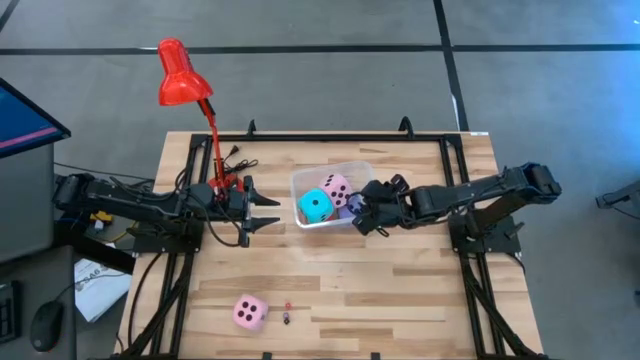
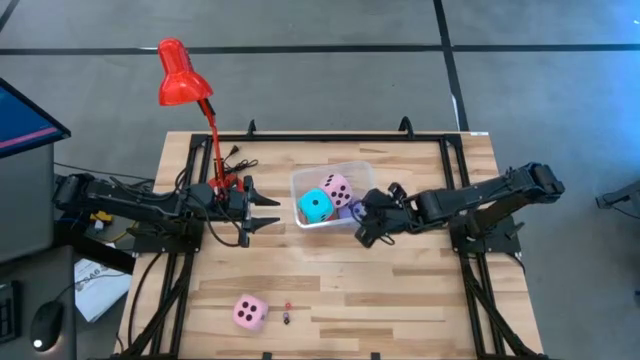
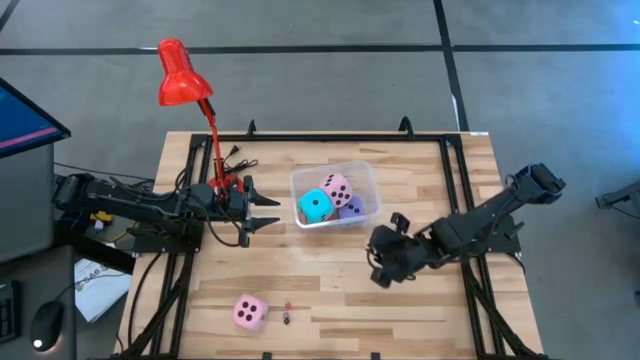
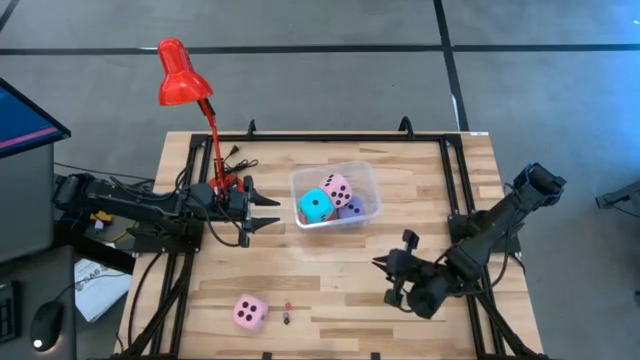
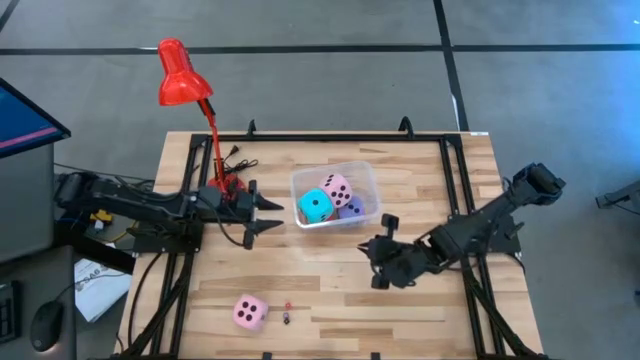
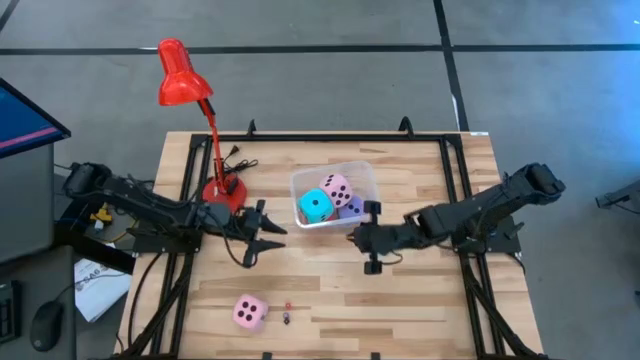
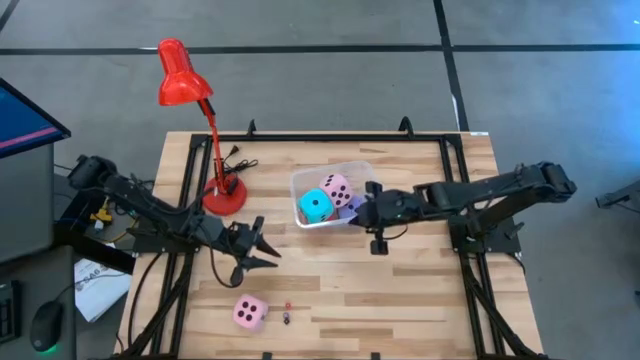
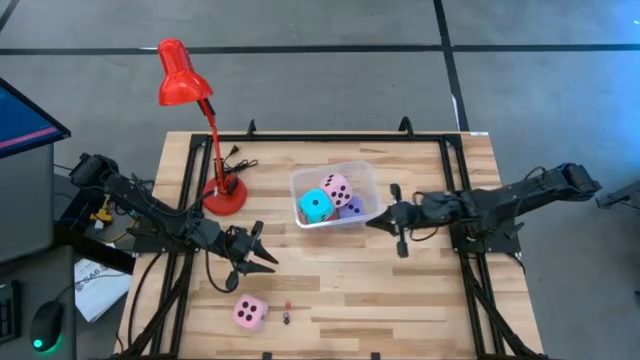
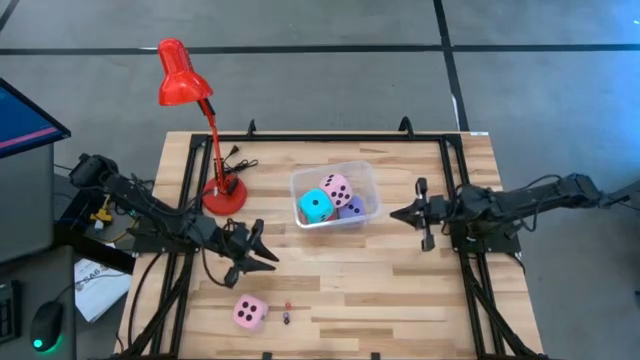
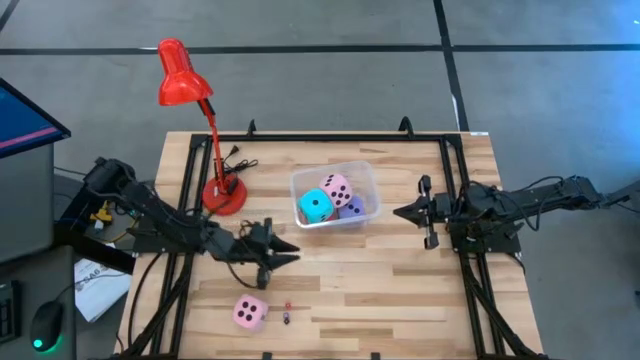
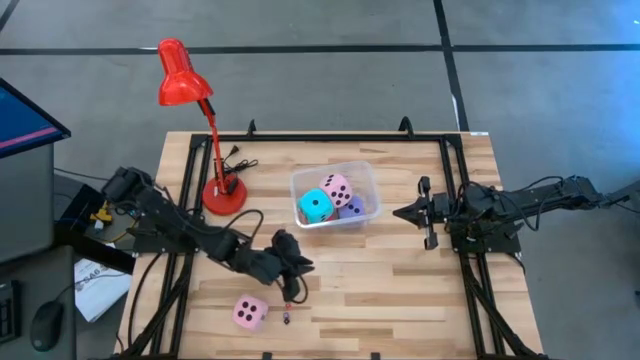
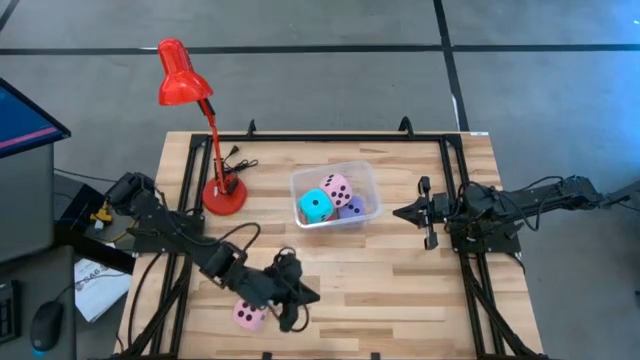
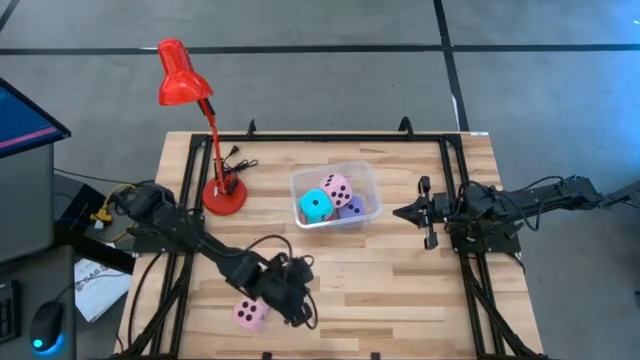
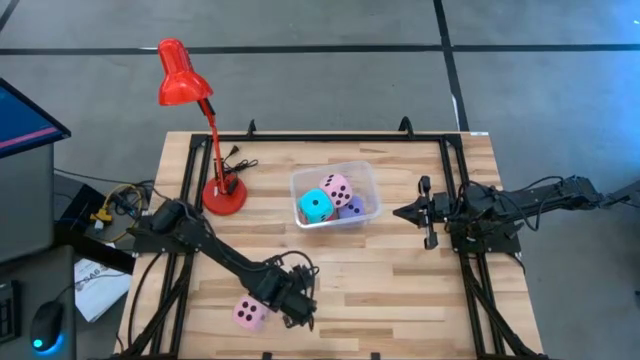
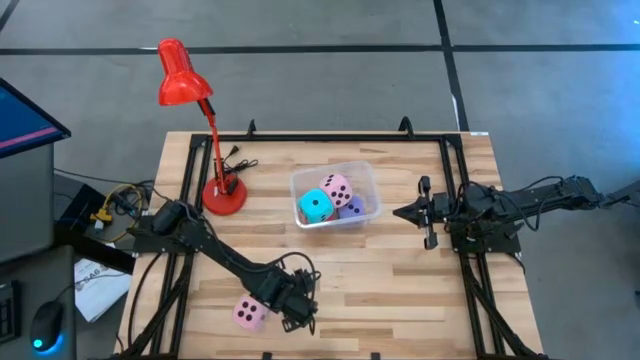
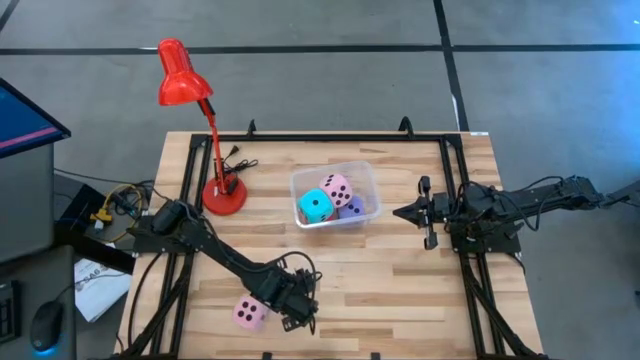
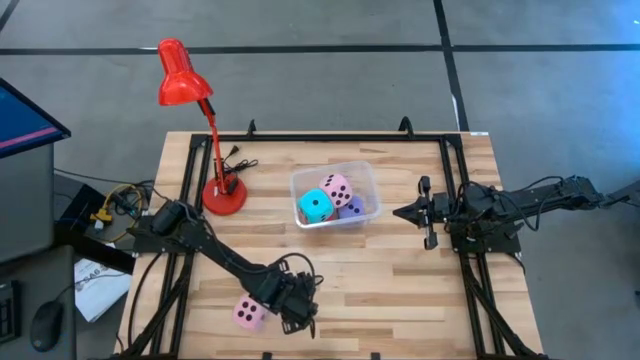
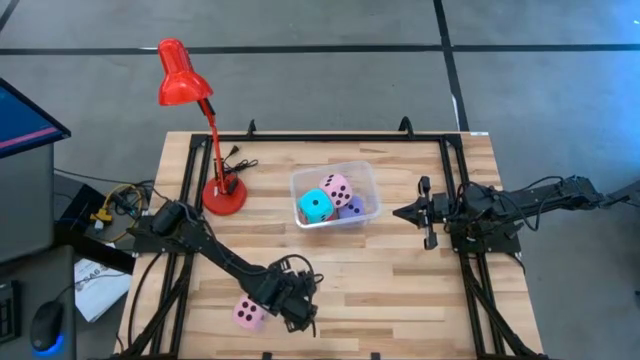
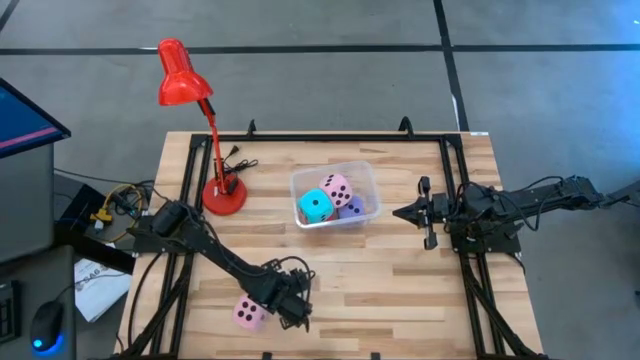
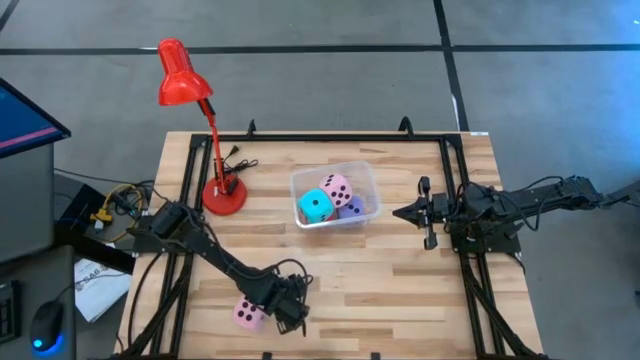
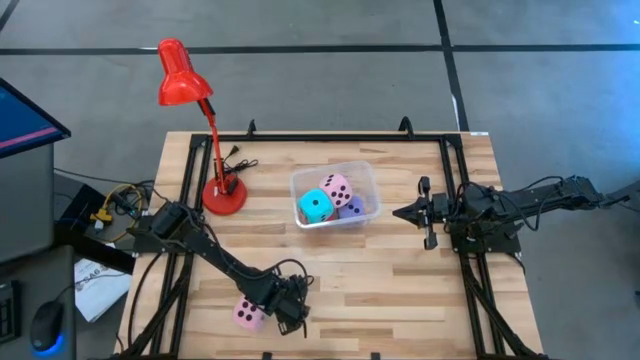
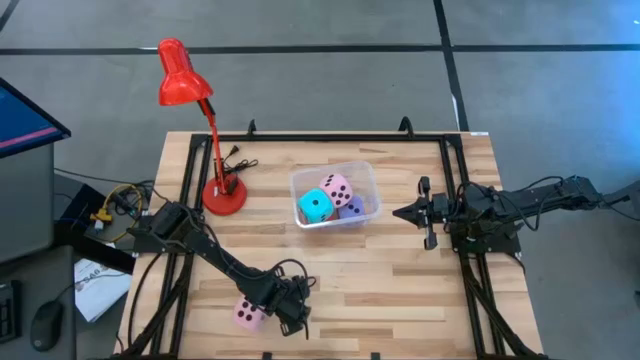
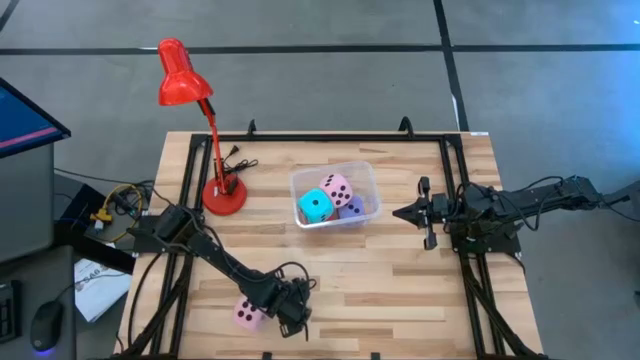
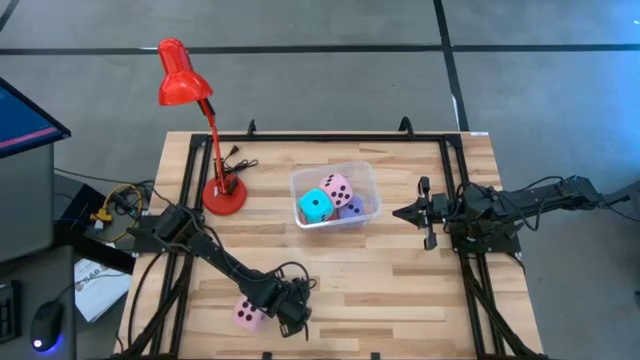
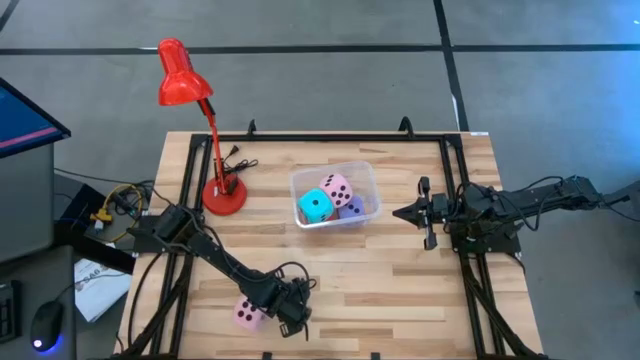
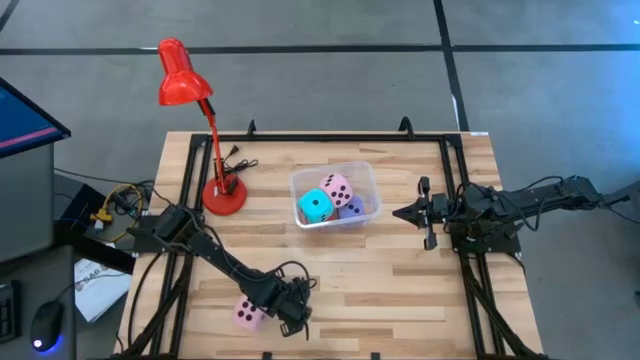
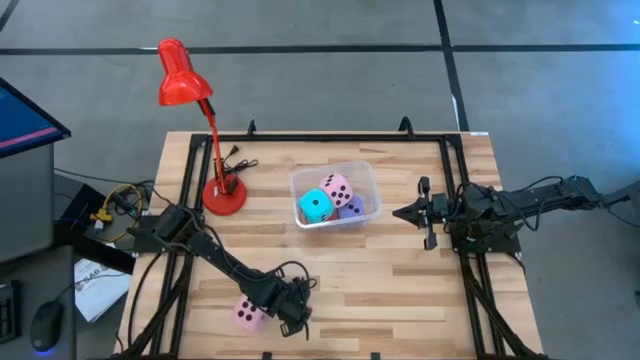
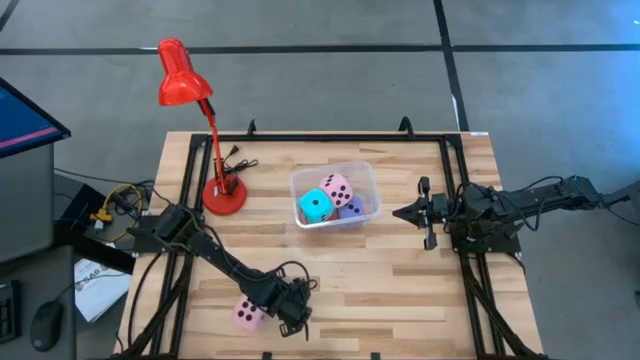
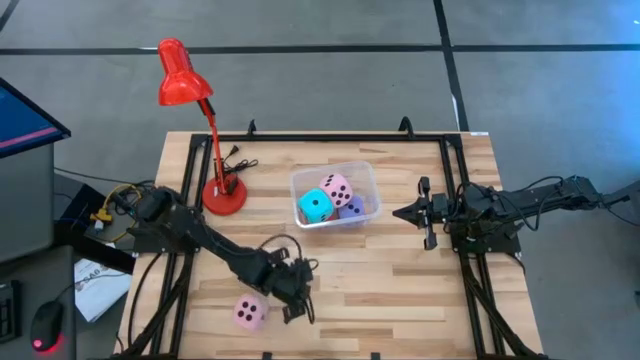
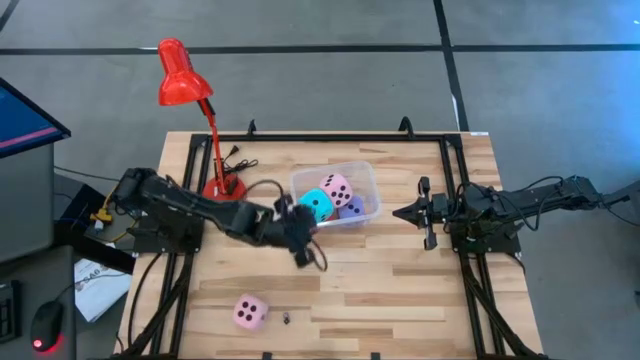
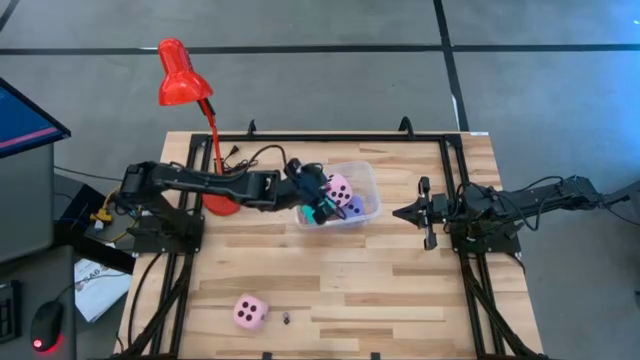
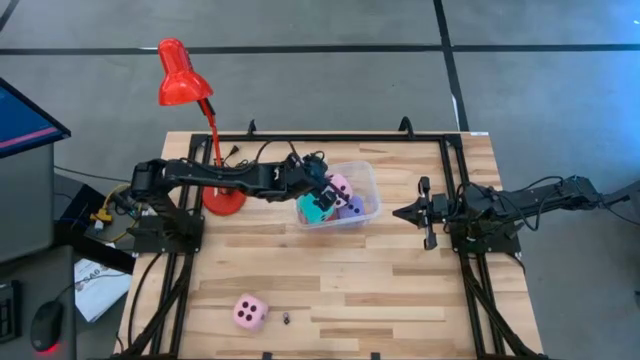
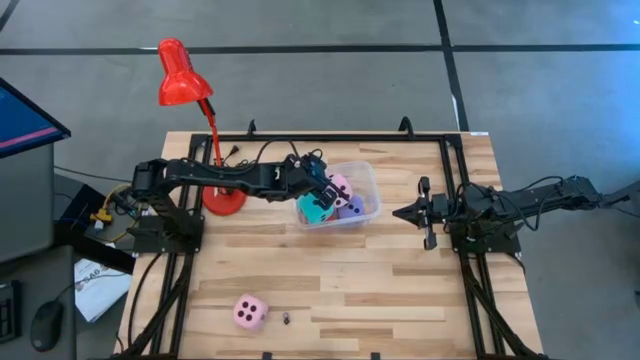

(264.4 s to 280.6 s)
Task: Pick & Place Dice
Put the small red die into the transparent bin

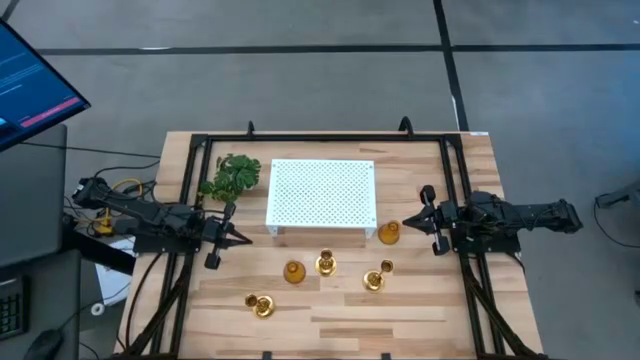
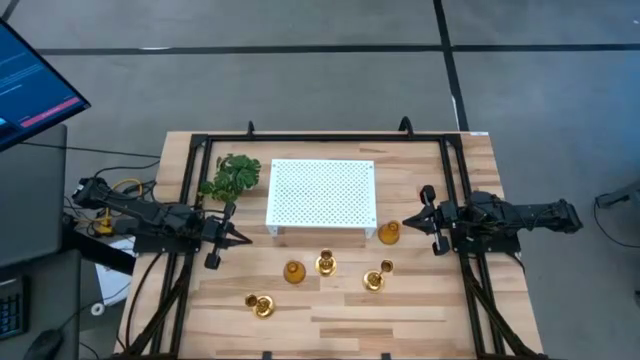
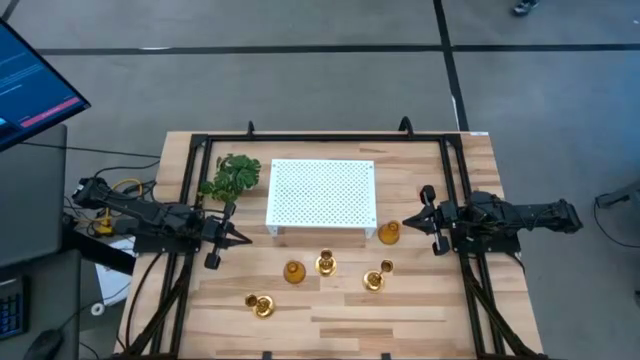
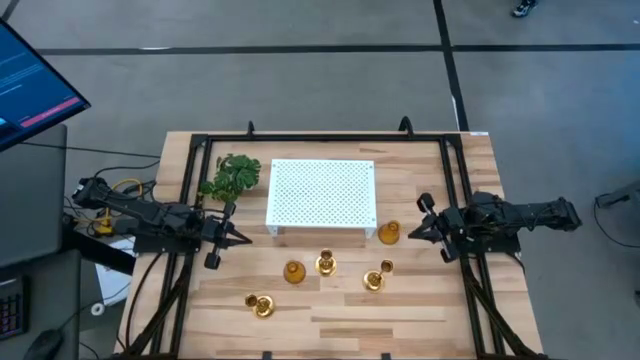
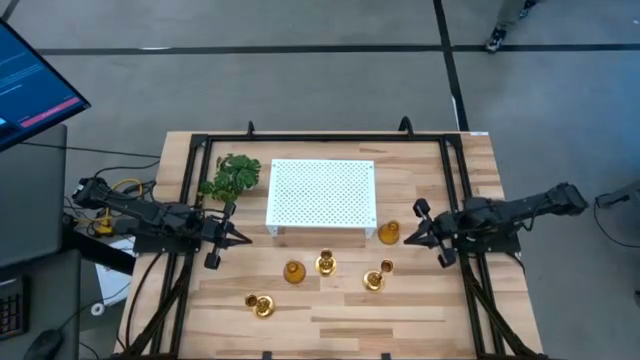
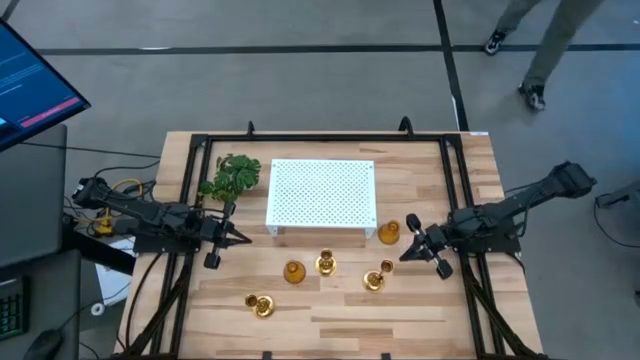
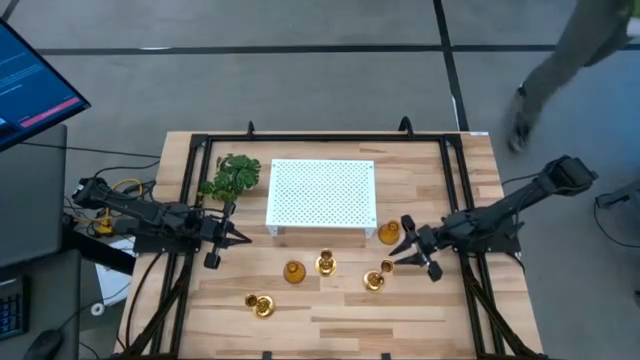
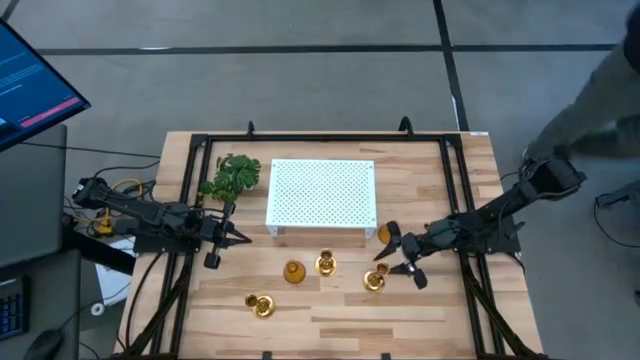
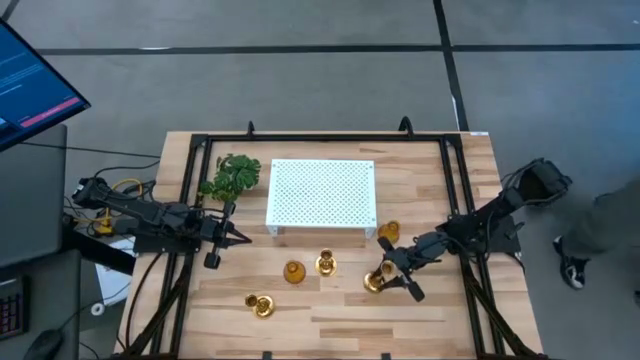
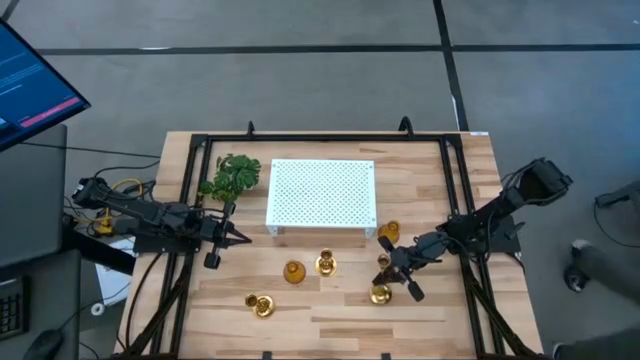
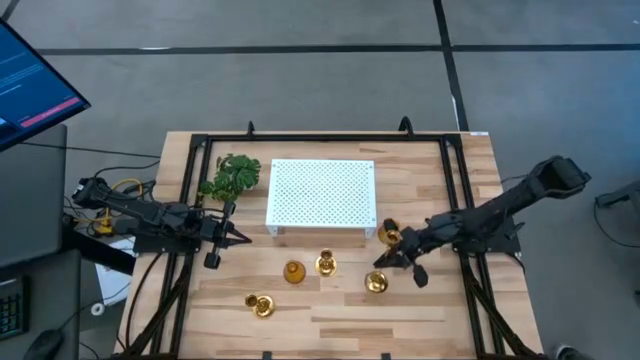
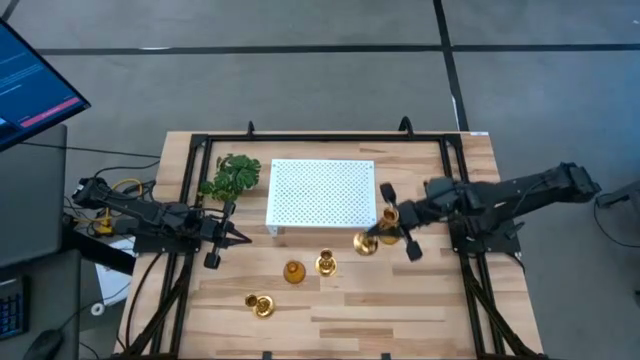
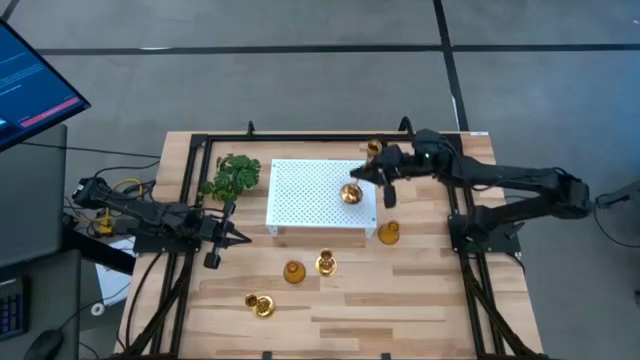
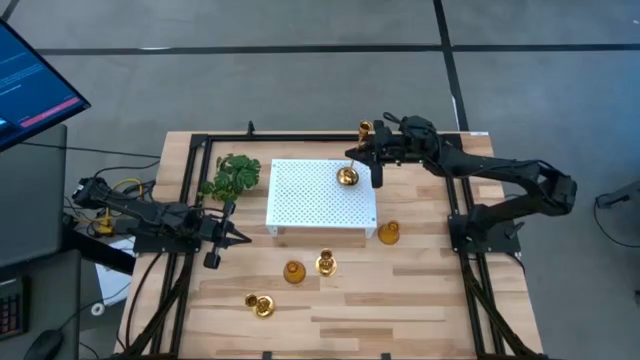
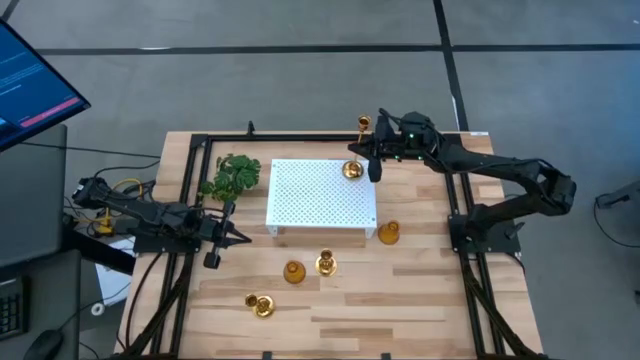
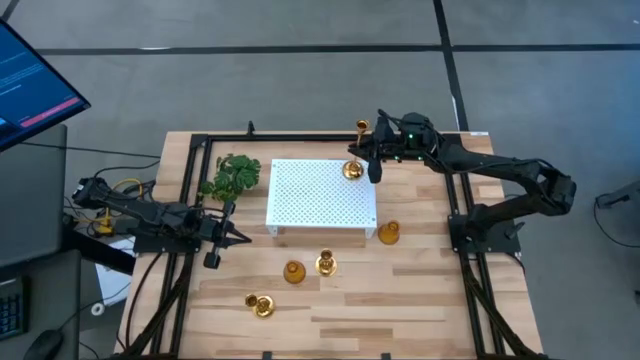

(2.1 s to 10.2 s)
Task: Pick & Place candle stick holders
Put the right gold candle holder on the shelf
